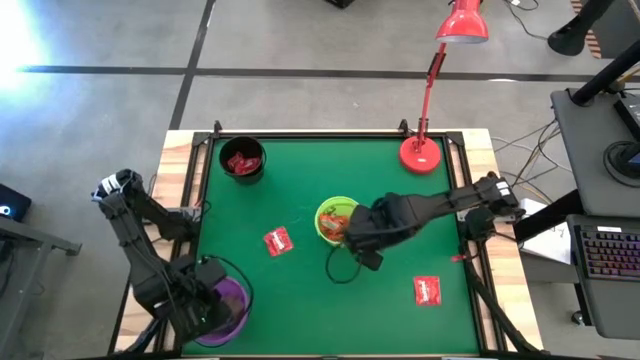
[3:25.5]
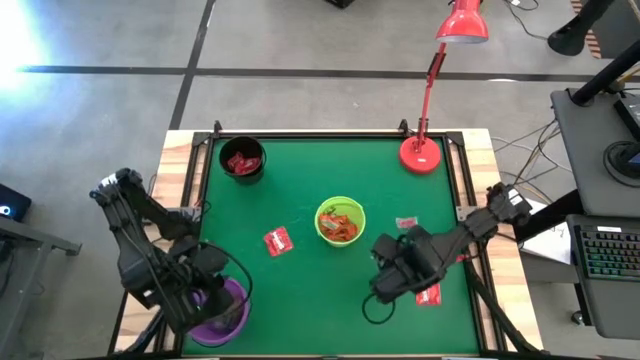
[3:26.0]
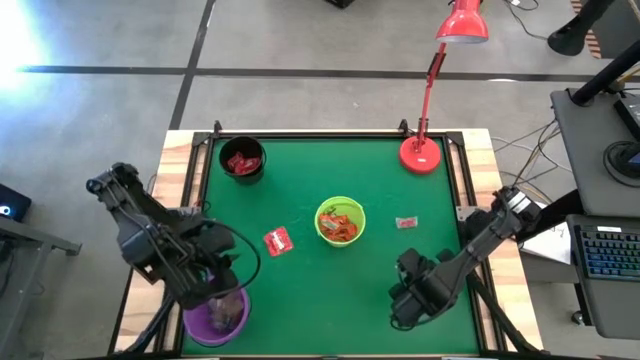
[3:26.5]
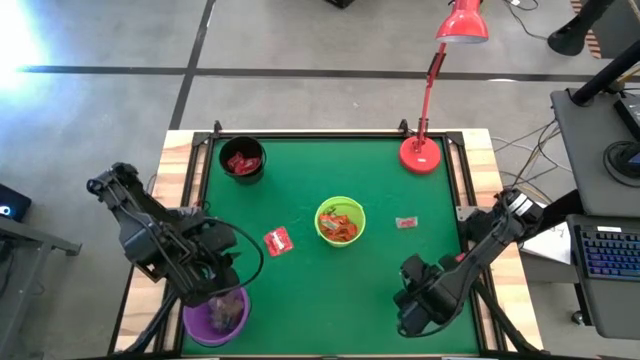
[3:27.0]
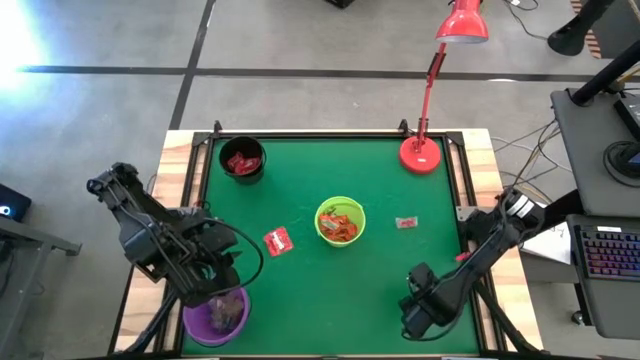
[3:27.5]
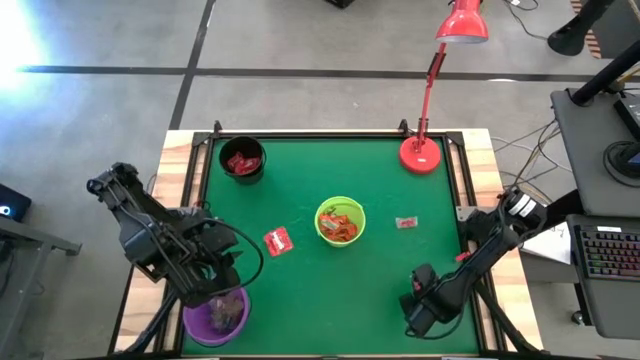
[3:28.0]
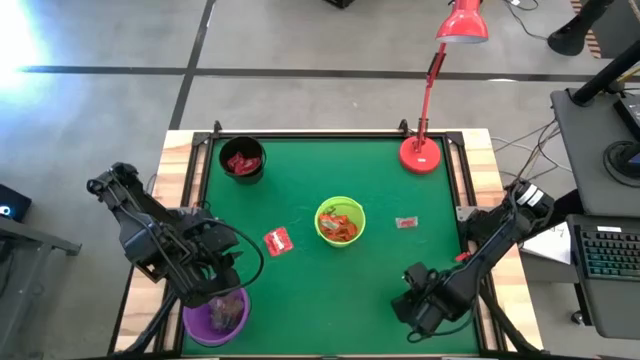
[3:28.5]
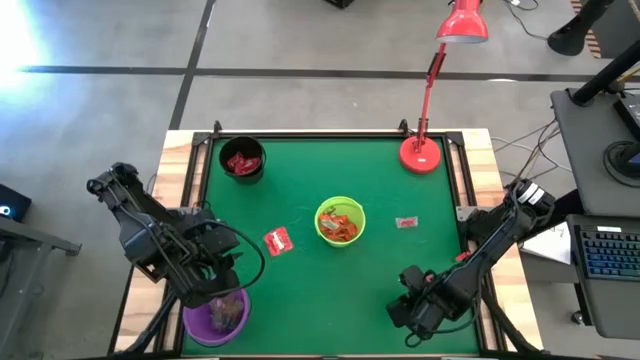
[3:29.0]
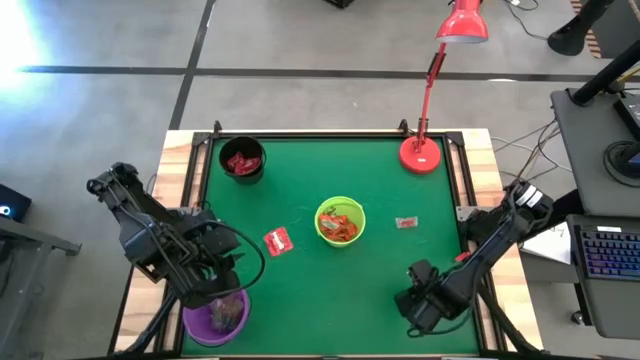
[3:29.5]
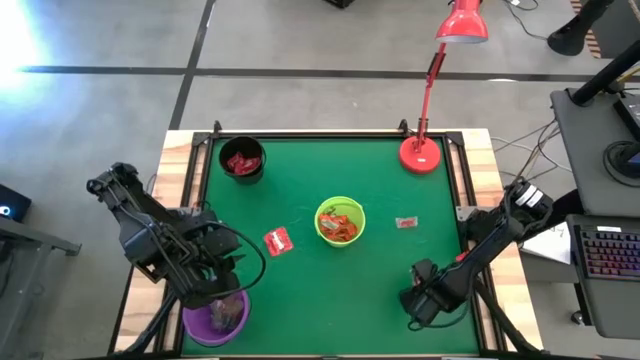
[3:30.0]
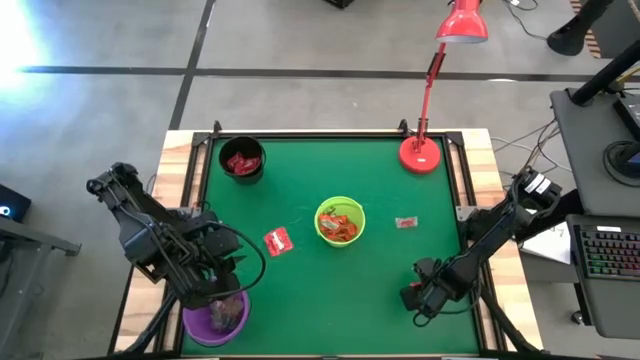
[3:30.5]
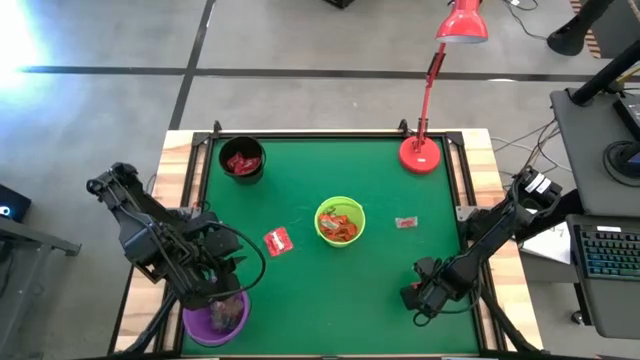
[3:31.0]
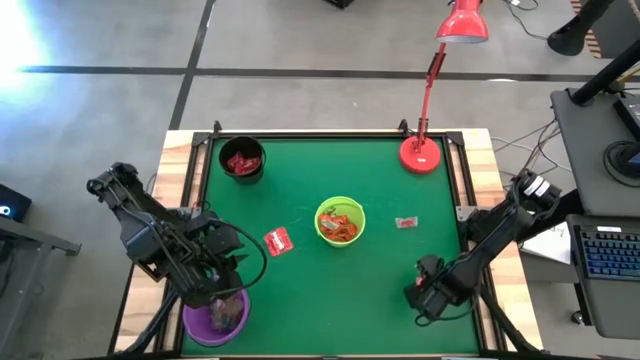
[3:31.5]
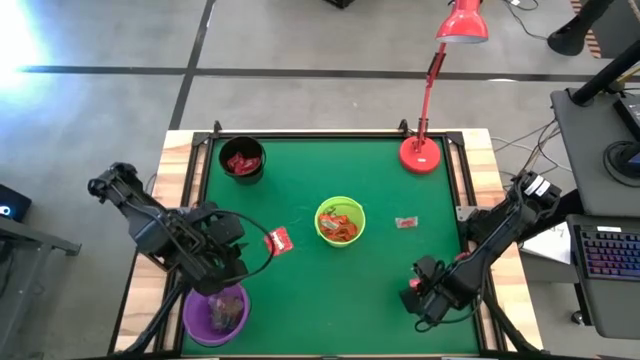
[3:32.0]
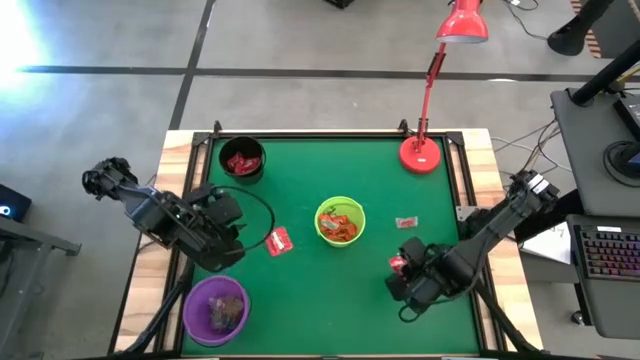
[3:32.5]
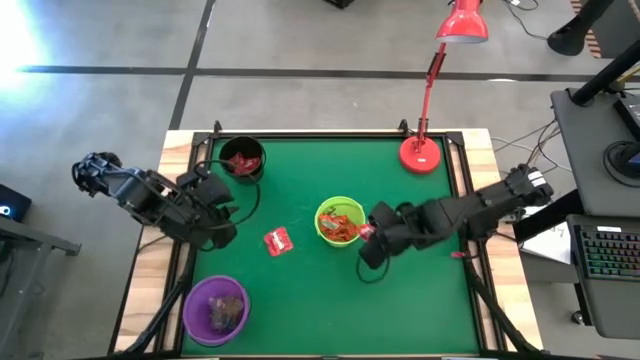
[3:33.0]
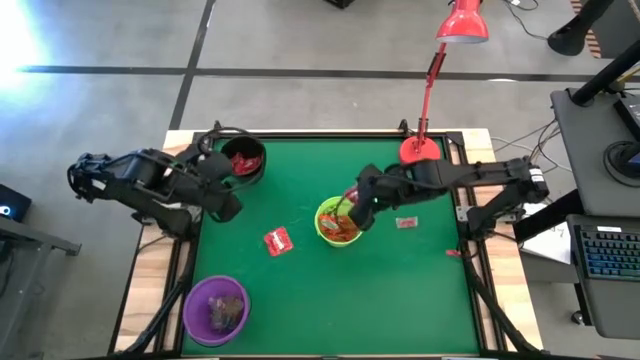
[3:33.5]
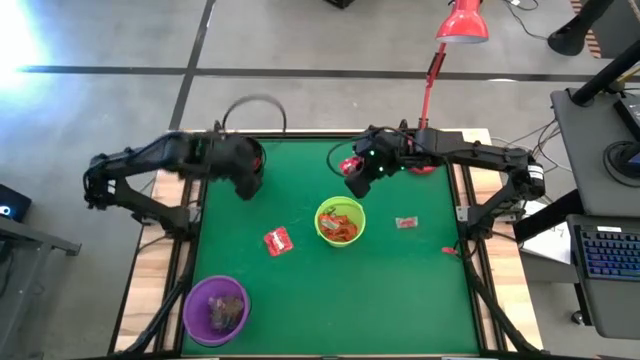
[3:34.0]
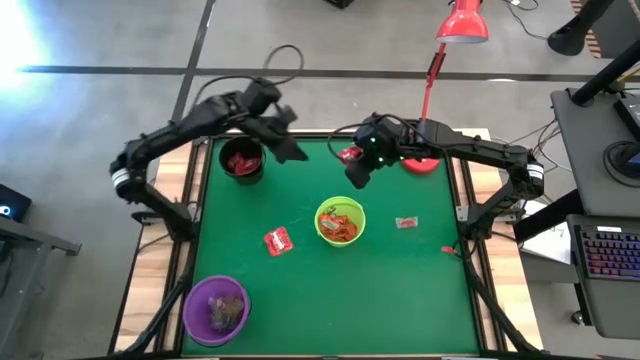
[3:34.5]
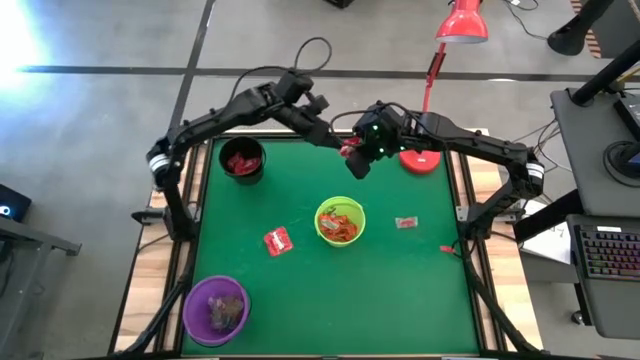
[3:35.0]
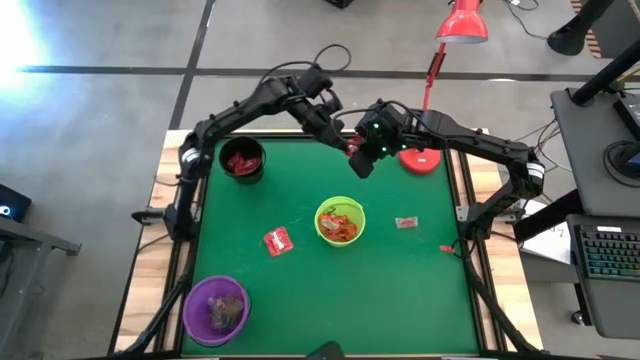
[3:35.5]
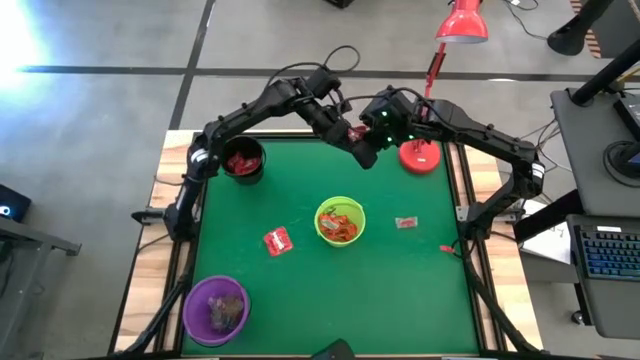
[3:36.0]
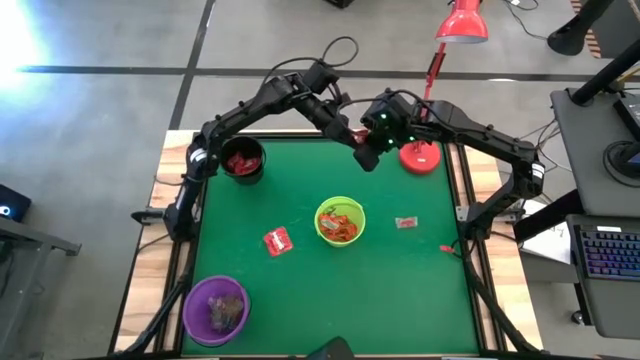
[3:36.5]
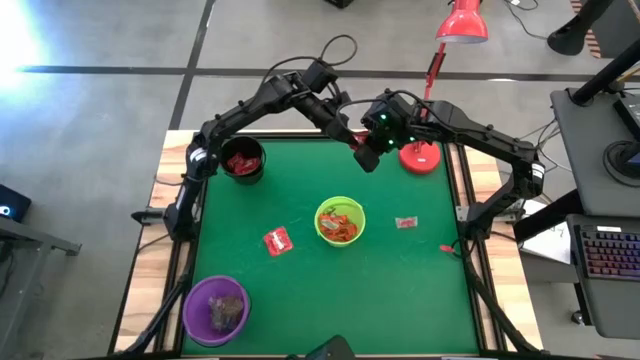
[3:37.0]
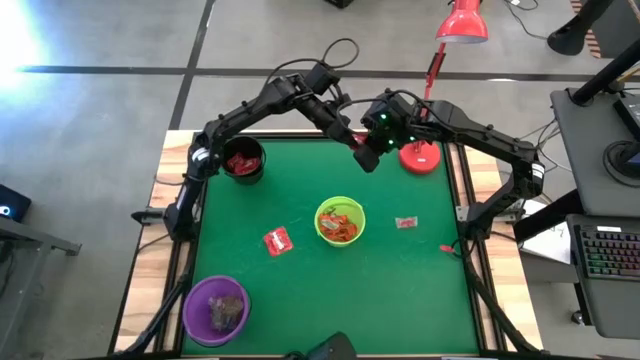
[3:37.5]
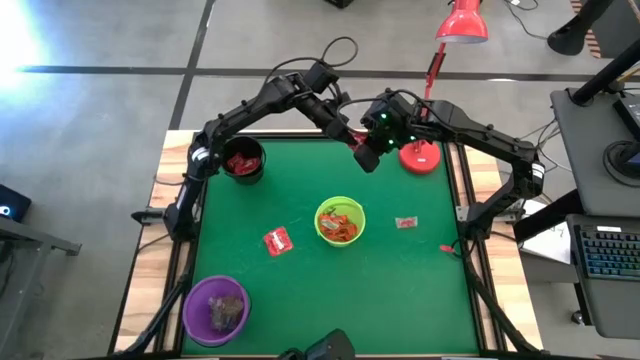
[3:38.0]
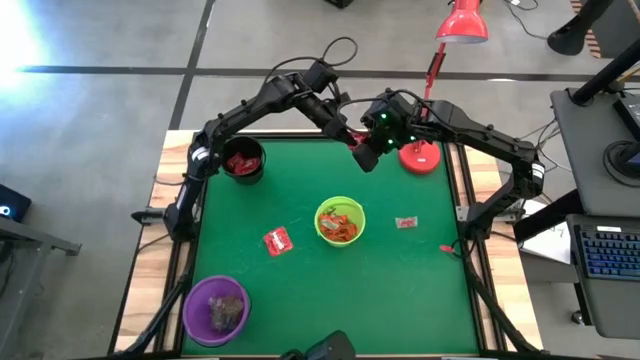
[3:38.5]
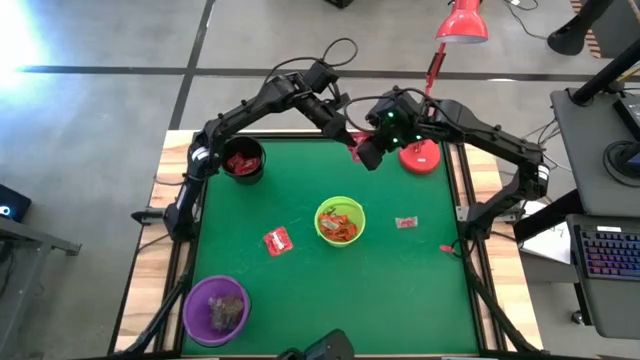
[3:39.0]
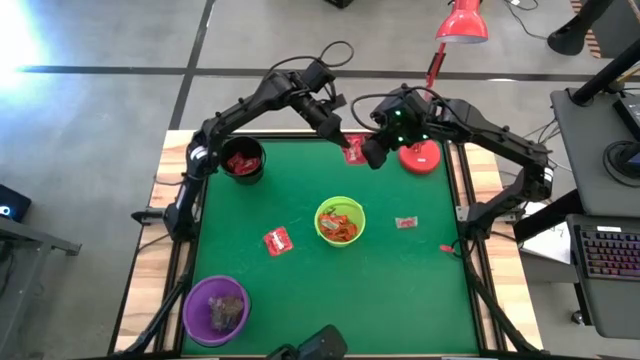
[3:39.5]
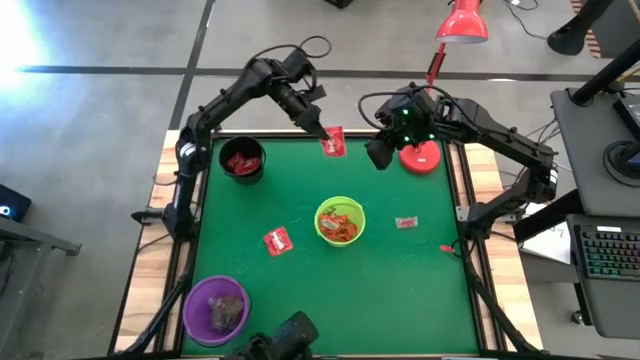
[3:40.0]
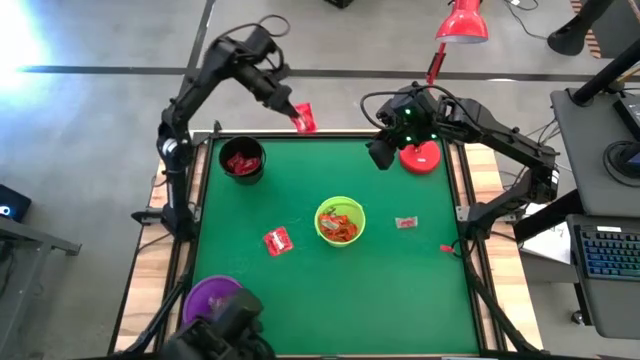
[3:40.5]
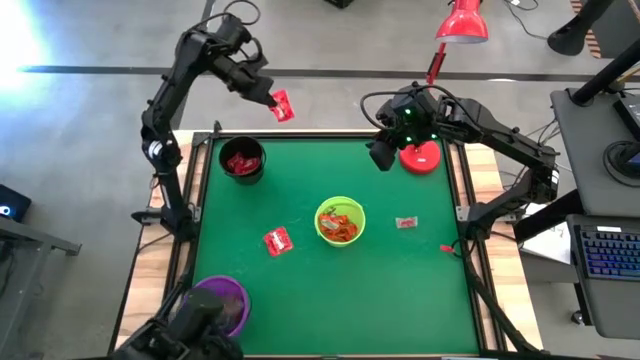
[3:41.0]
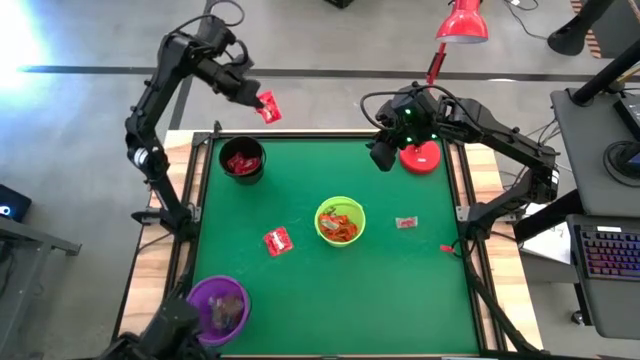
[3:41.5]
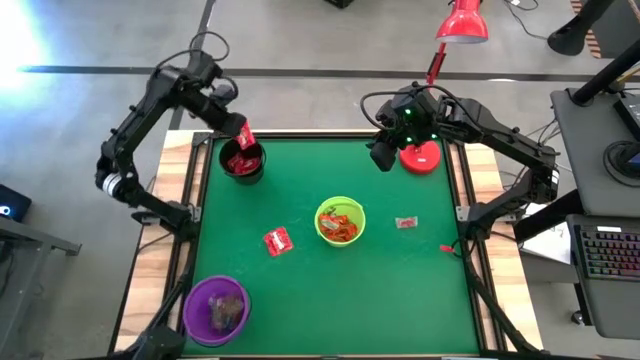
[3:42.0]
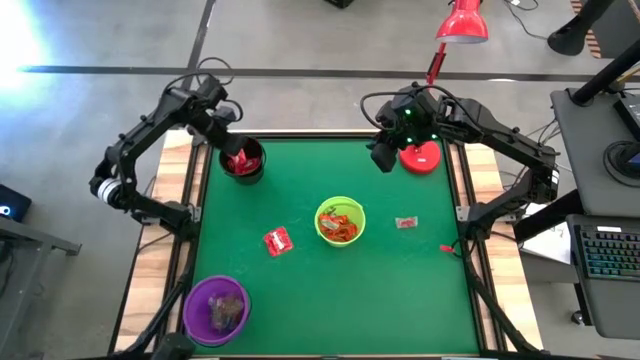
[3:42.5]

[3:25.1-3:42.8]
Task: Sort candy
Put the red candy into the black bucket

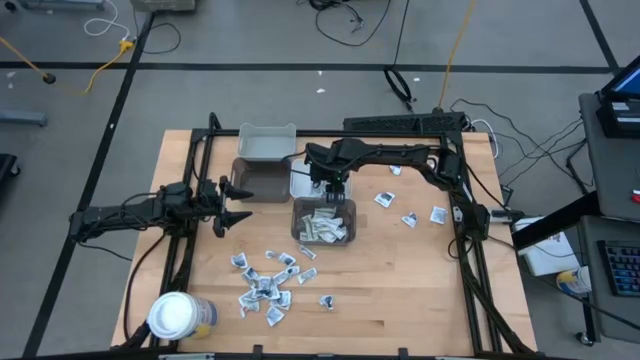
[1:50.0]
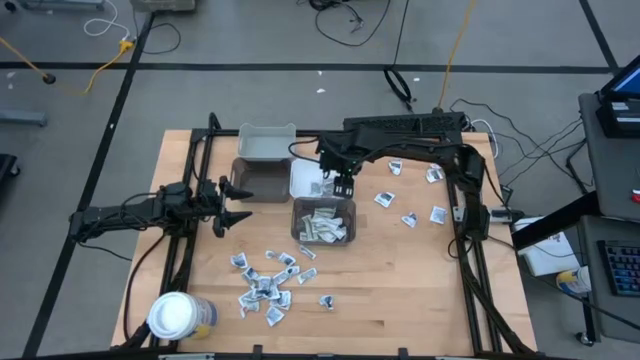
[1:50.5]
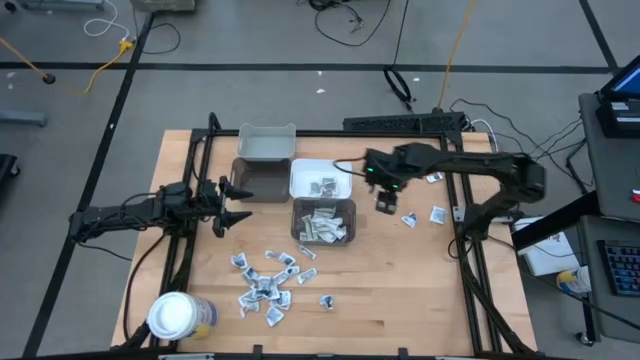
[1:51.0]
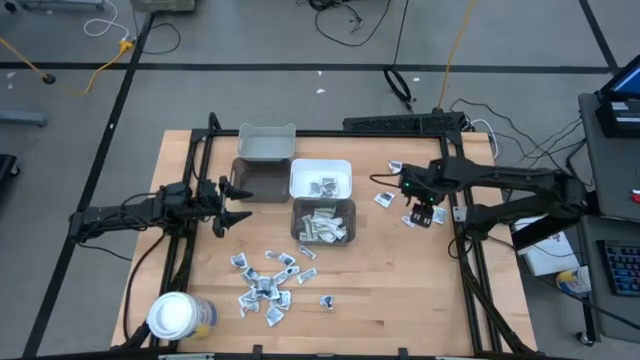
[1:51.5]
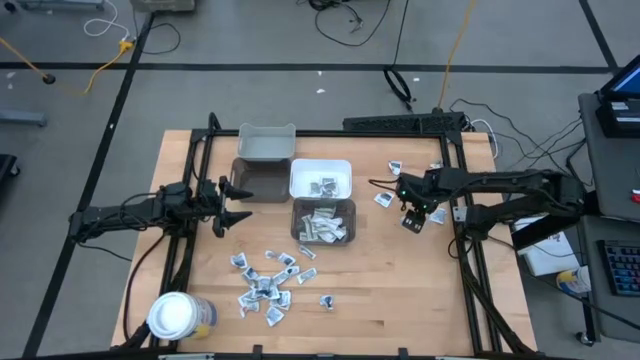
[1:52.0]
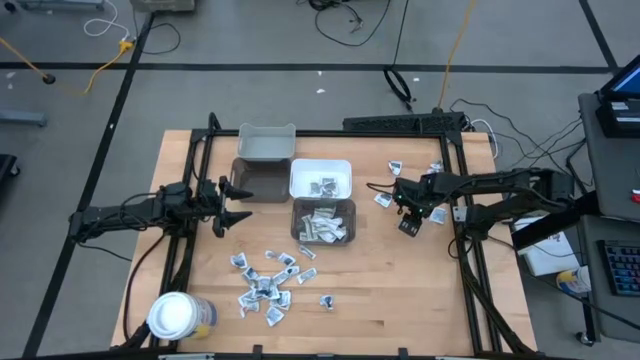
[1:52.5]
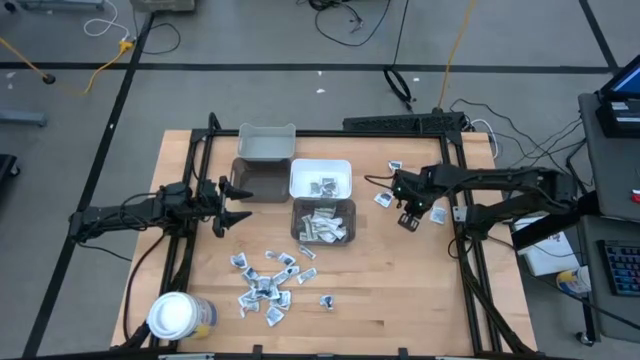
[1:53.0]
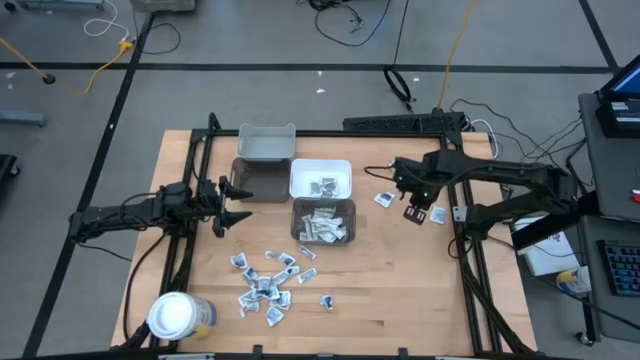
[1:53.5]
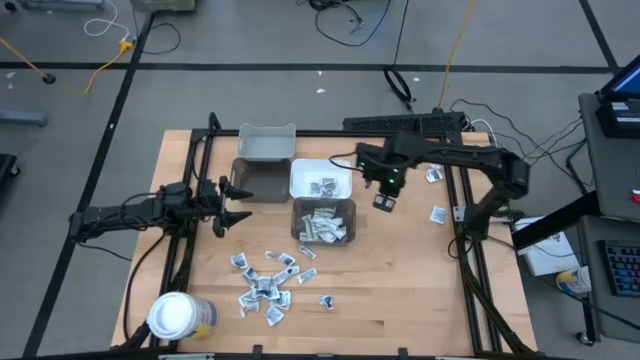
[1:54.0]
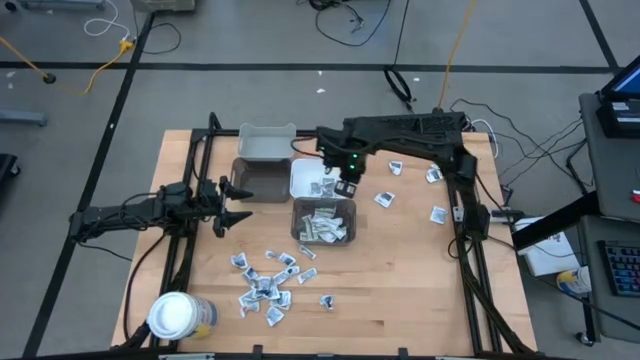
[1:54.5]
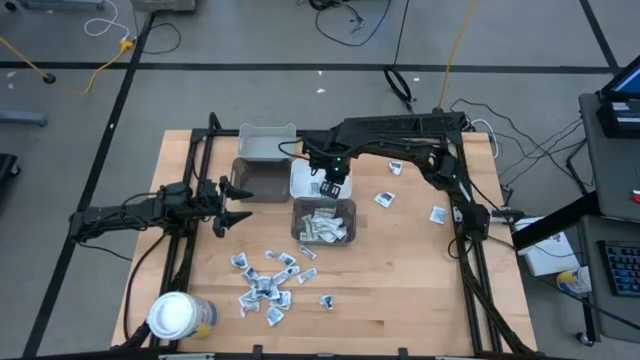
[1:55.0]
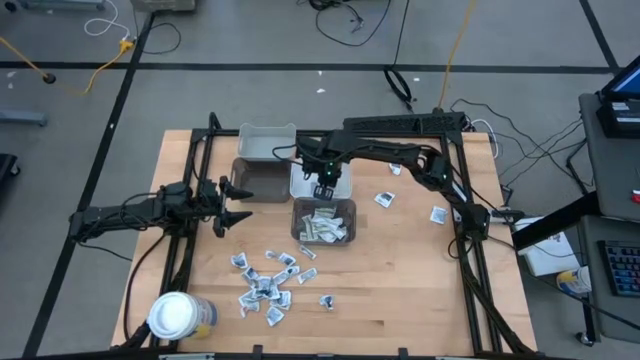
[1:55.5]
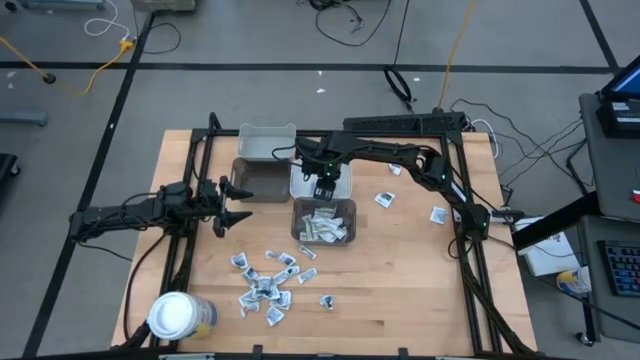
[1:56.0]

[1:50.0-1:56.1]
Task: Pick & Place First Aid Supplies
Put the gray towelette pack into the white bin
